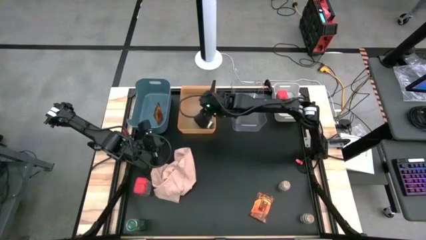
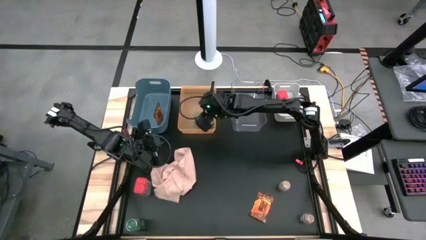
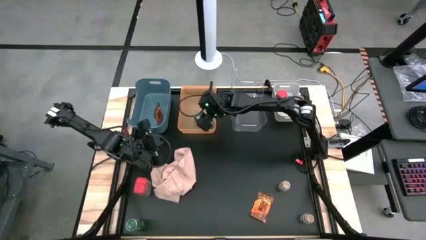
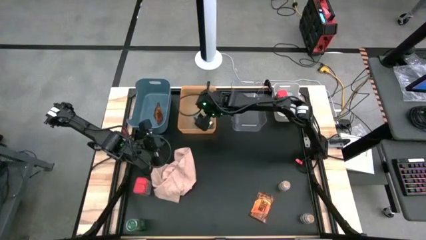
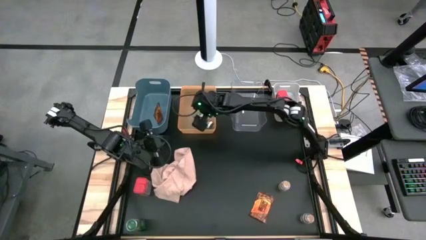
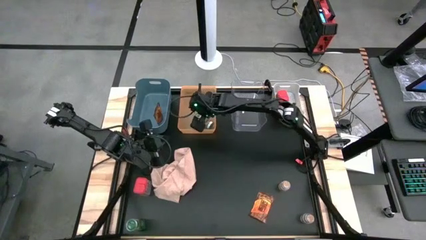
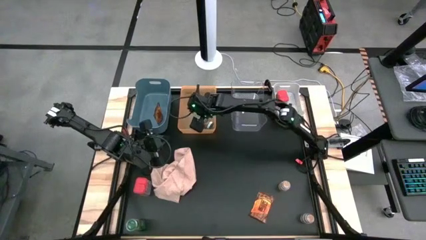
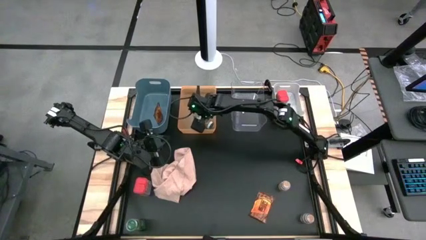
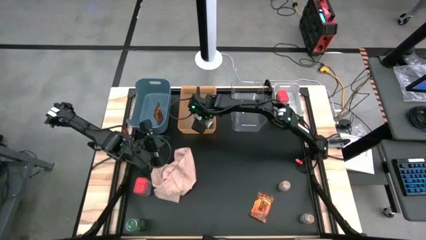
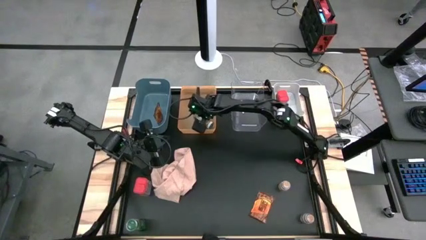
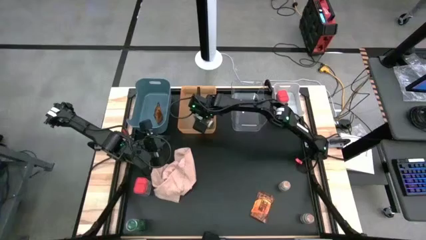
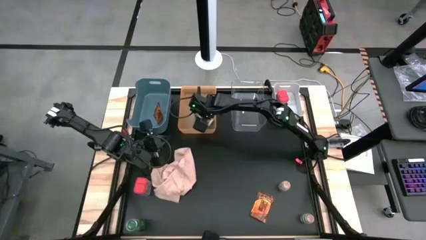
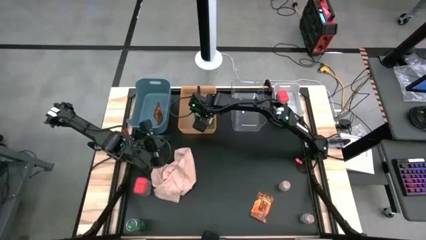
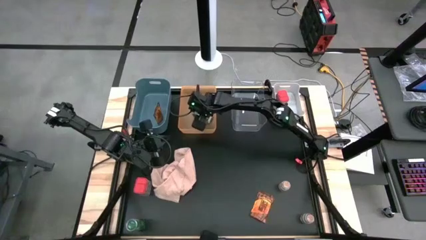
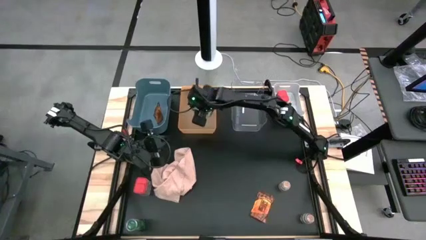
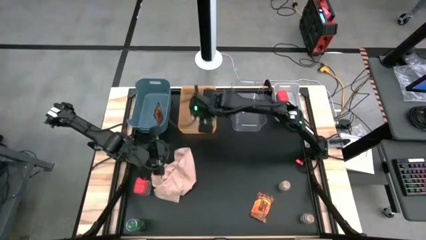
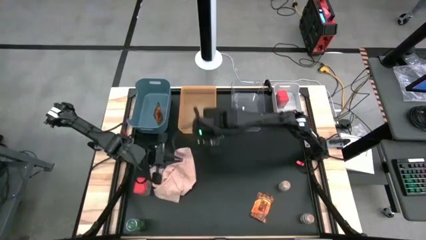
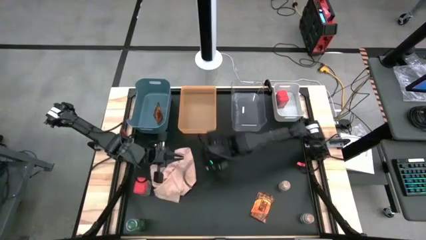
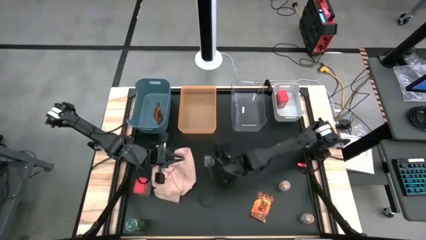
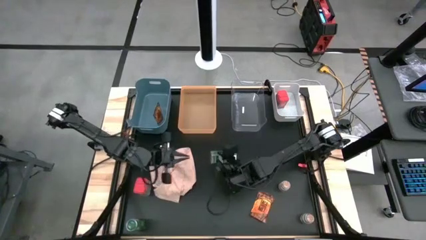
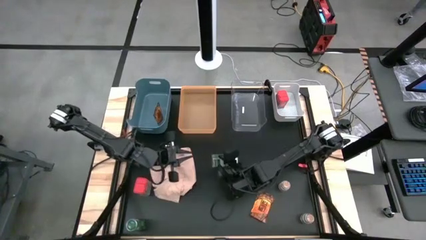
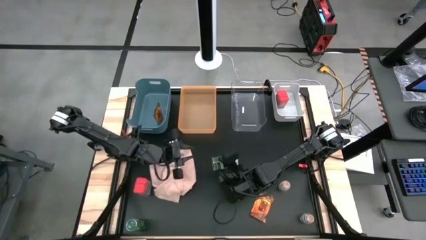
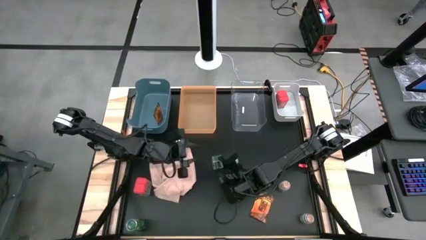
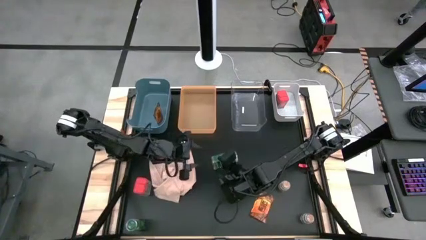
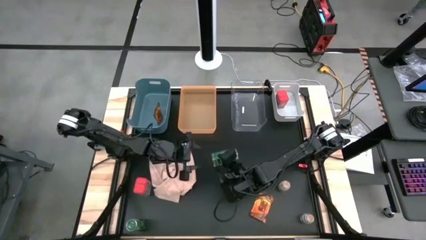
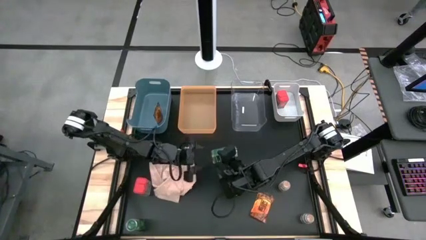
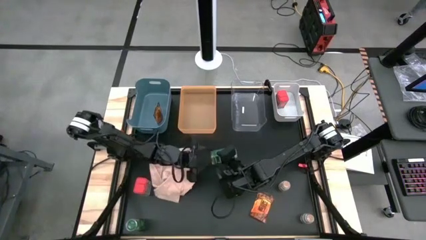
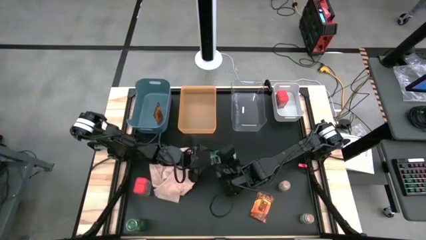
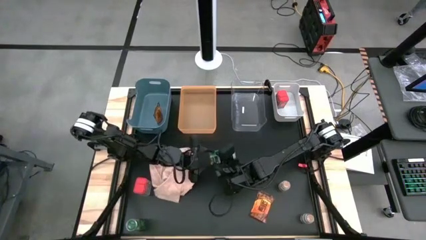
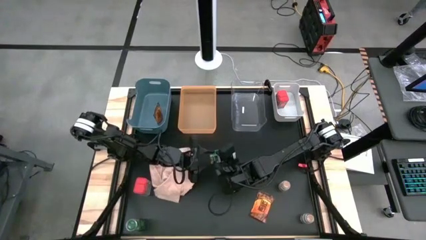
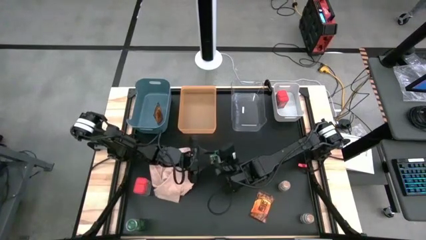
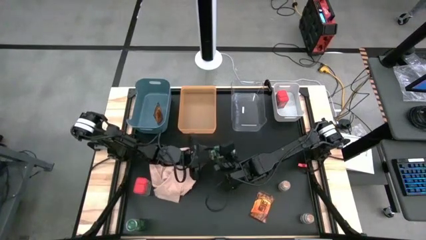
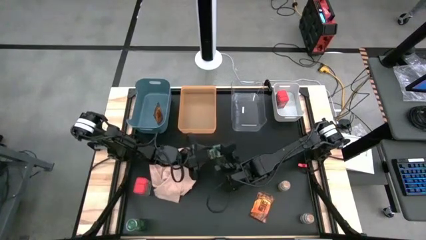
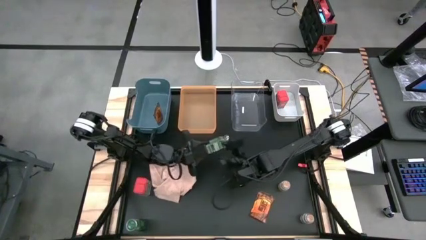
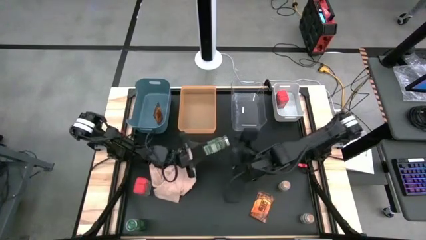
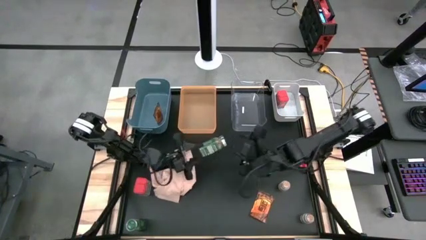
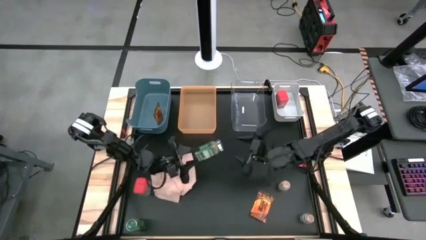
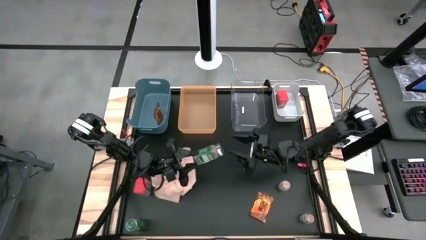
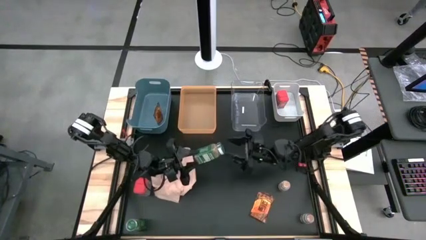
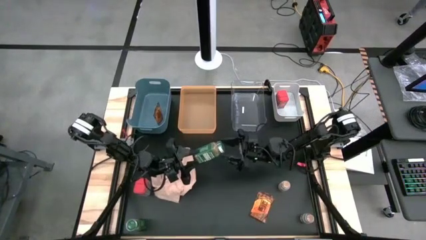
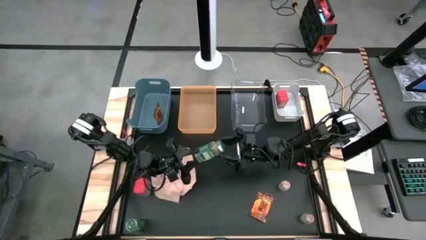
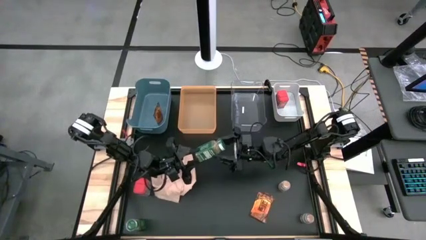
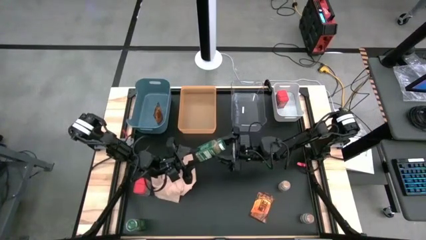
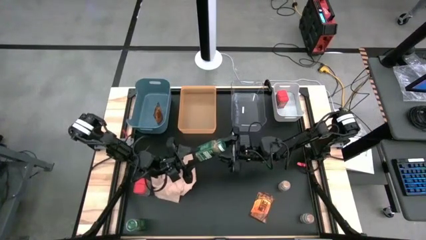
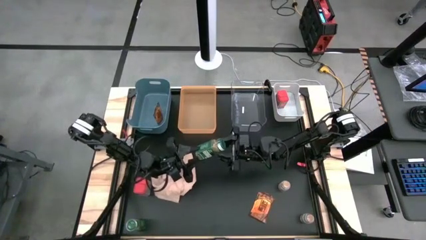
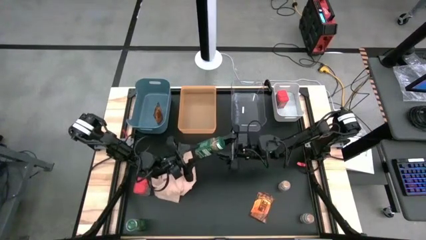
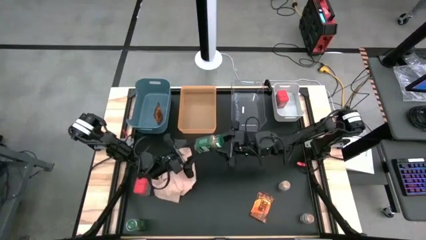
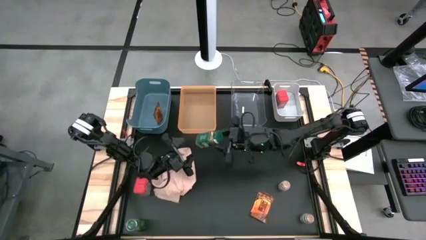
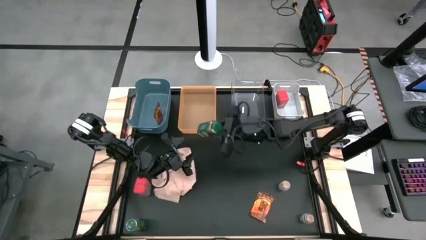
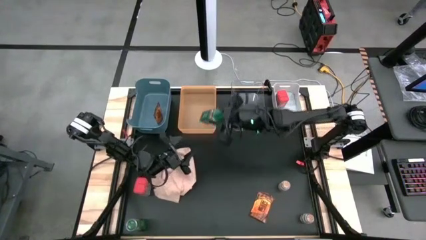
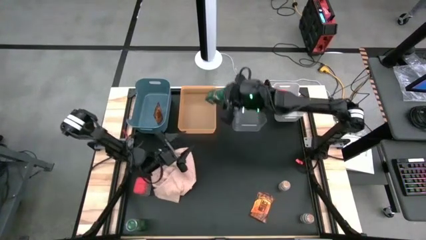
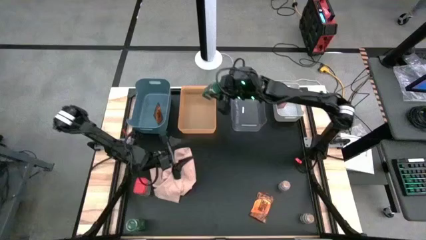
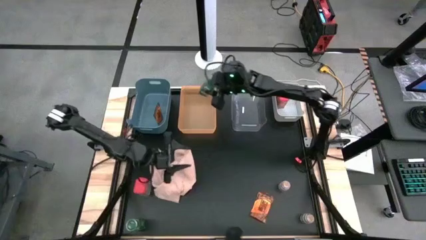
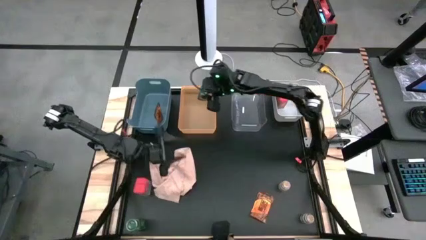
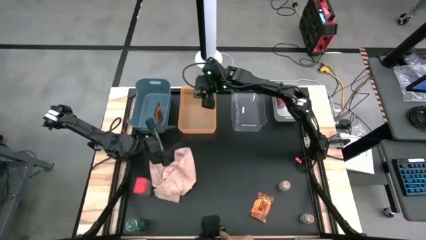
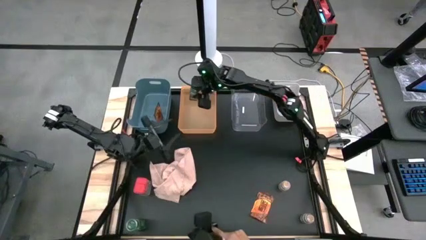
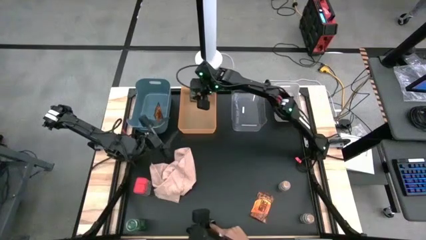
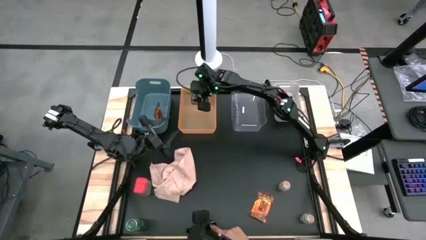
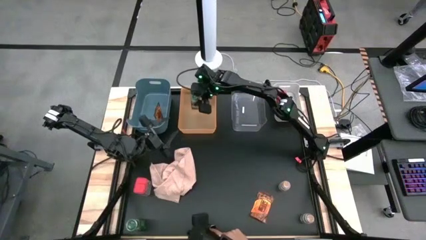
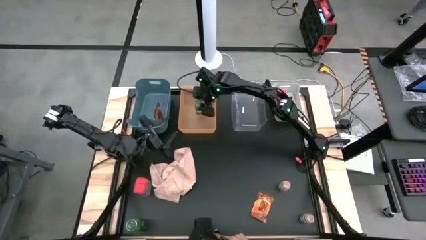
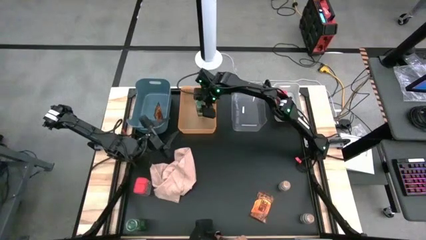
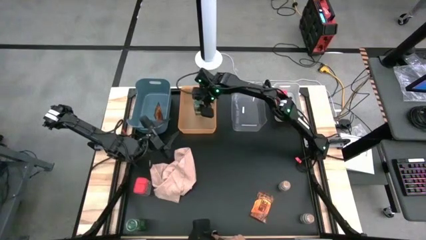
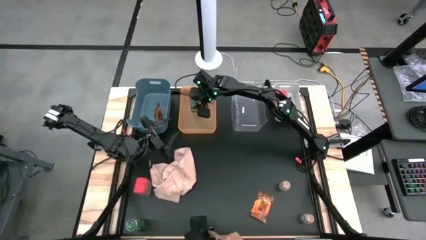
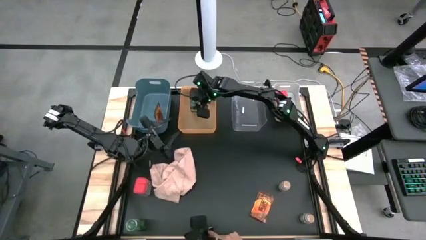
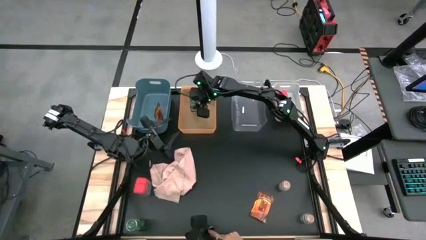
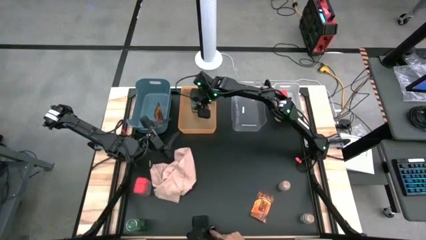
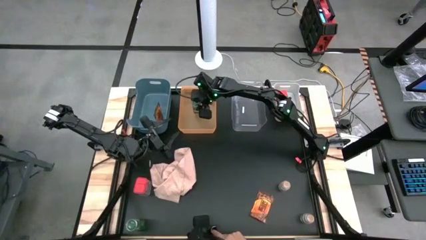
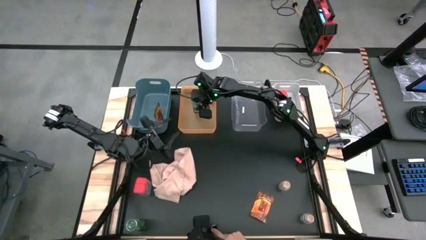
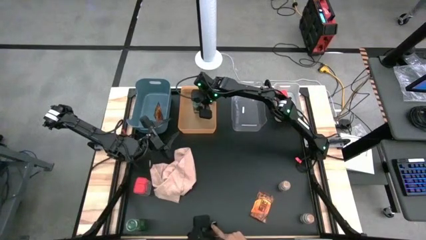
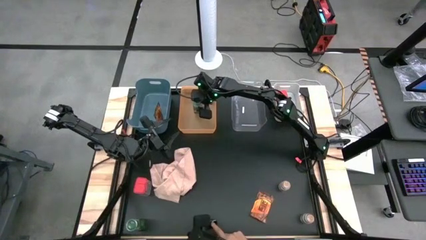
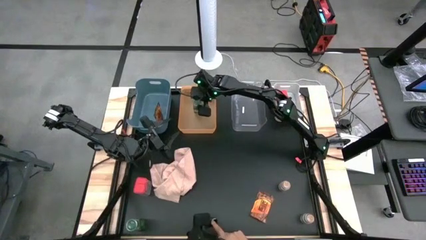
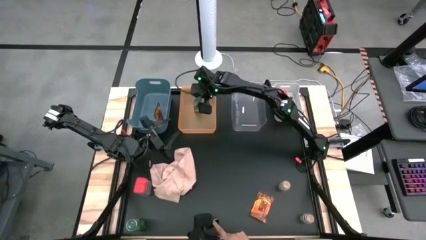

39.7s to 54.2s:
Task: Sort spices by type
Put the top green seasoning bottle into the orange bin
